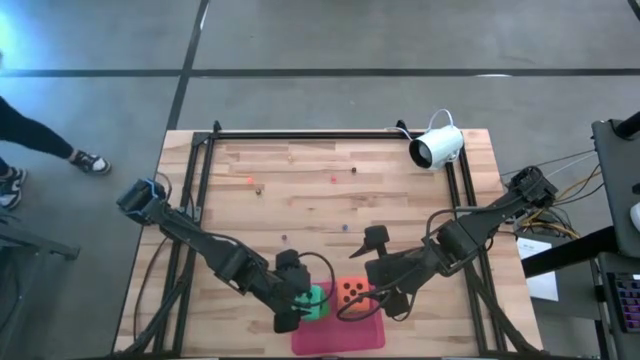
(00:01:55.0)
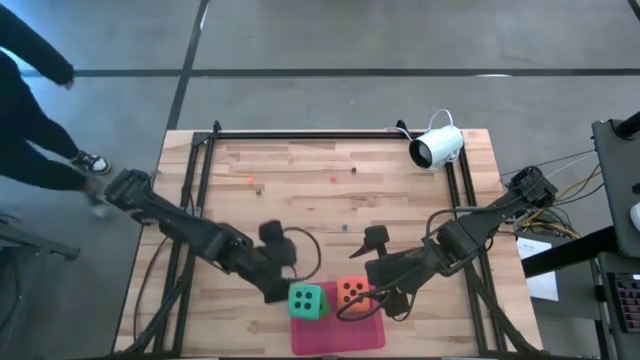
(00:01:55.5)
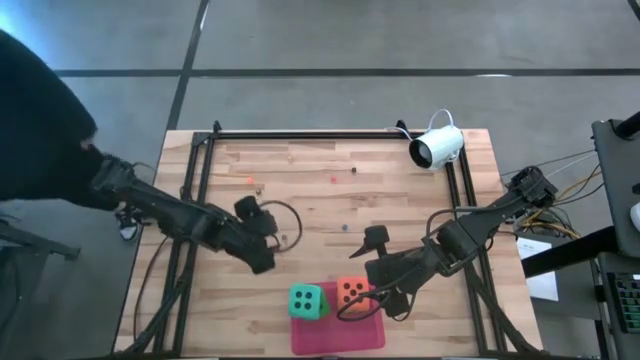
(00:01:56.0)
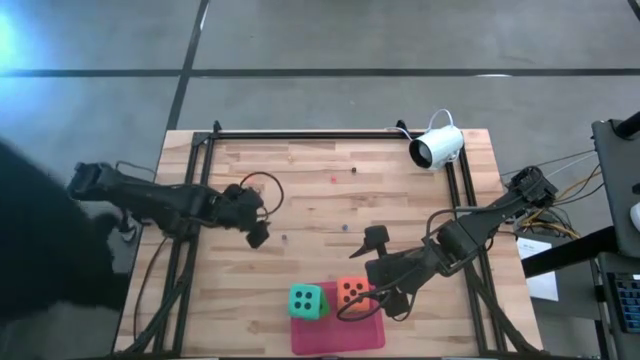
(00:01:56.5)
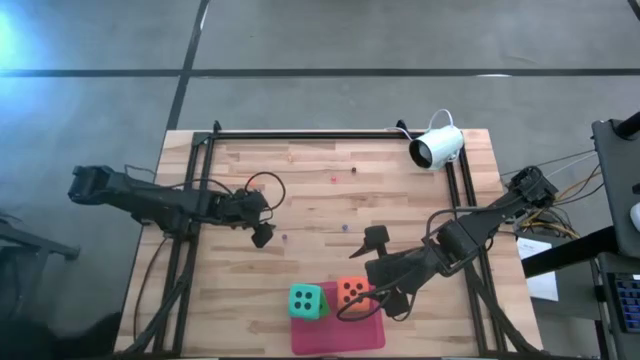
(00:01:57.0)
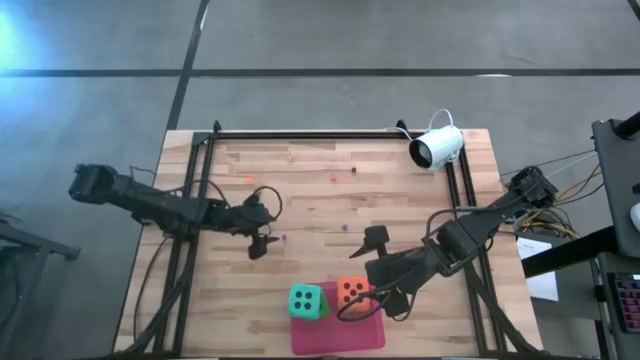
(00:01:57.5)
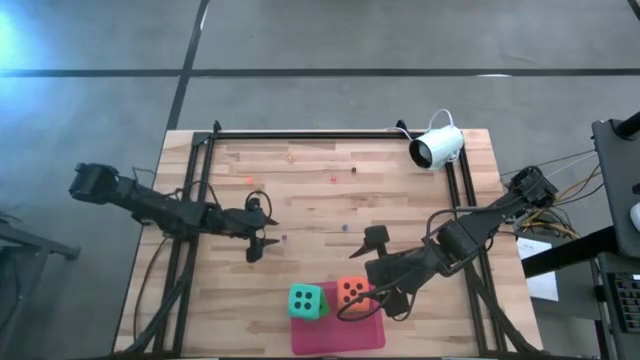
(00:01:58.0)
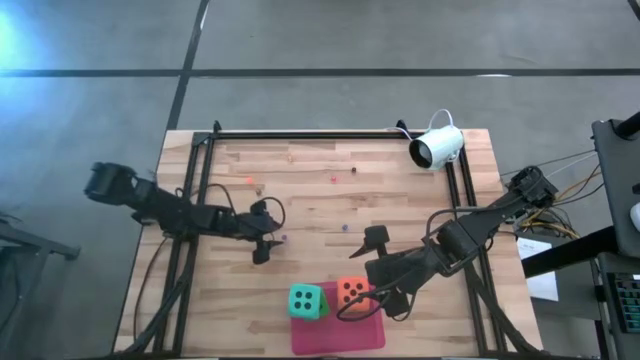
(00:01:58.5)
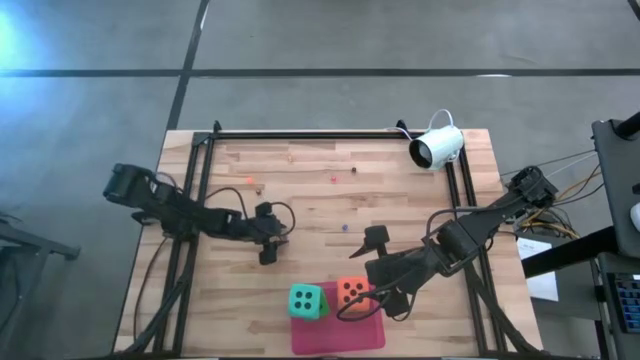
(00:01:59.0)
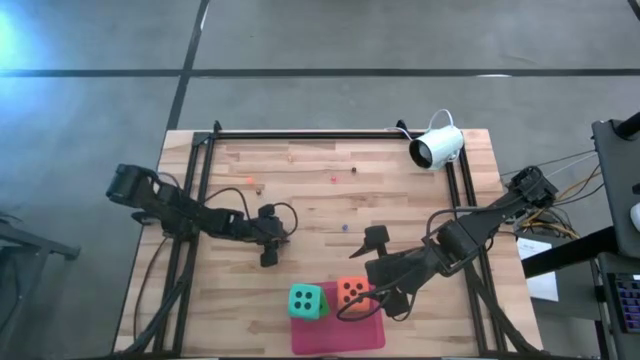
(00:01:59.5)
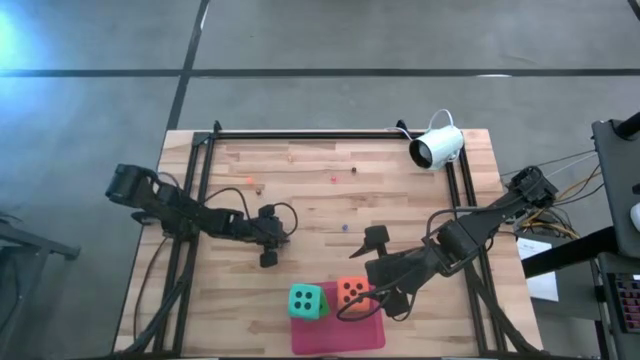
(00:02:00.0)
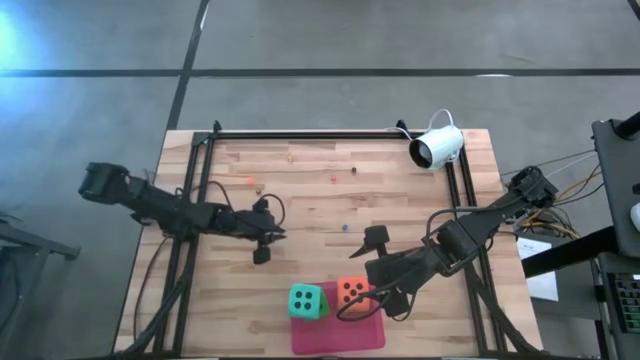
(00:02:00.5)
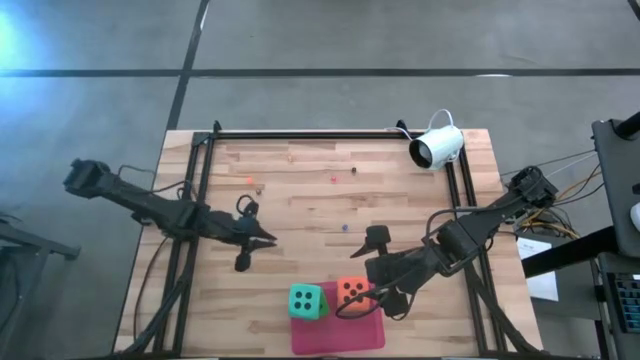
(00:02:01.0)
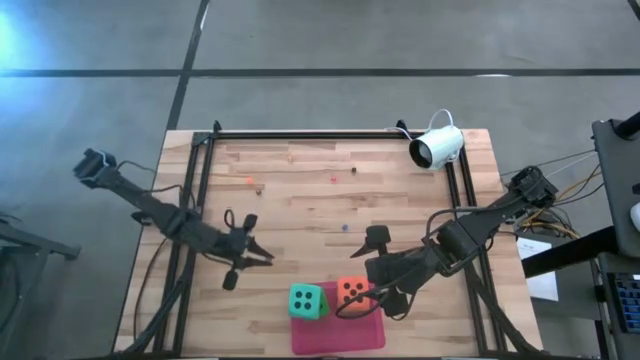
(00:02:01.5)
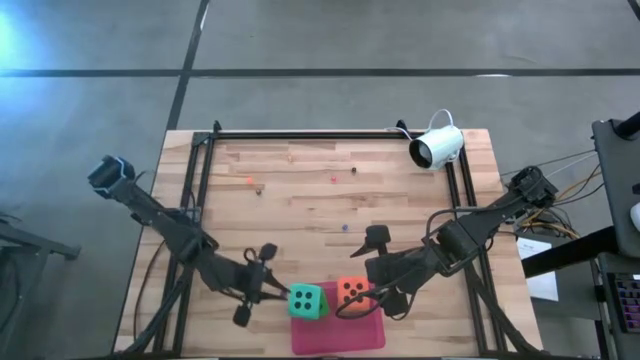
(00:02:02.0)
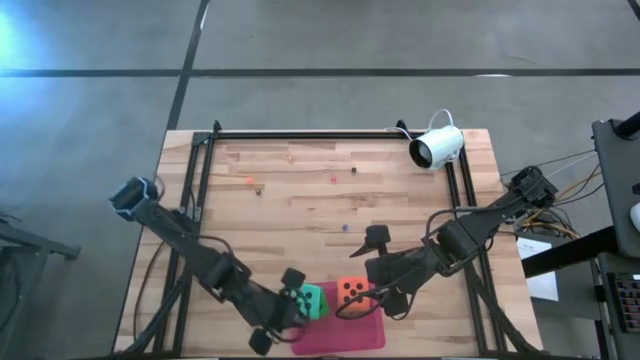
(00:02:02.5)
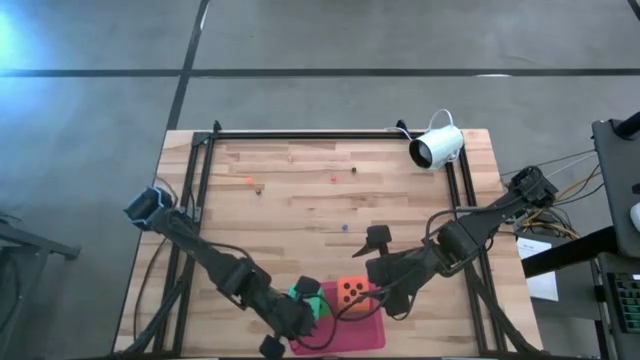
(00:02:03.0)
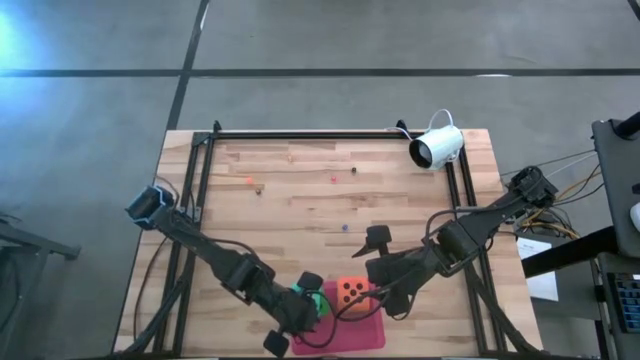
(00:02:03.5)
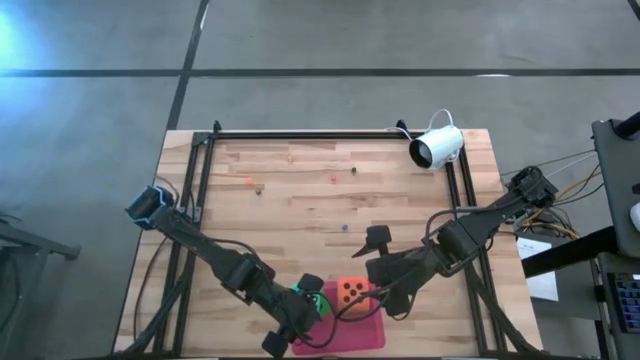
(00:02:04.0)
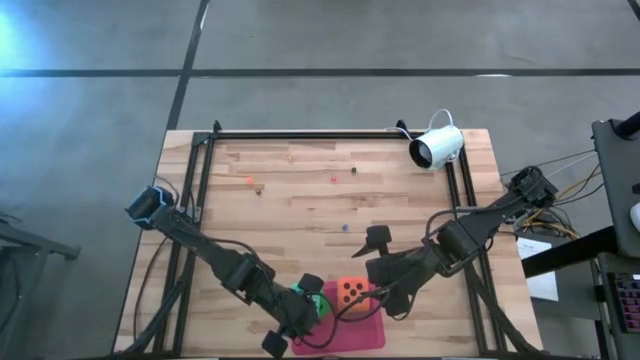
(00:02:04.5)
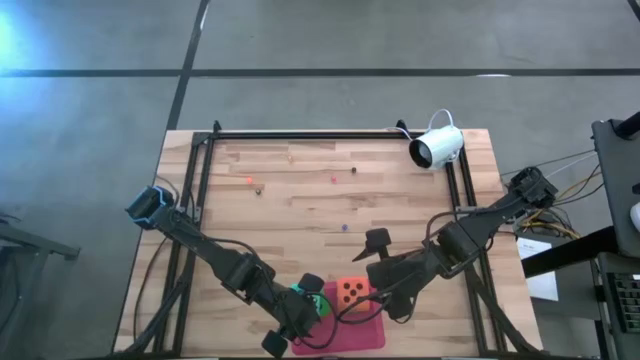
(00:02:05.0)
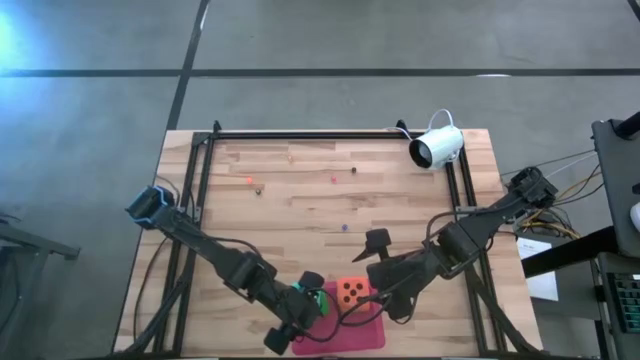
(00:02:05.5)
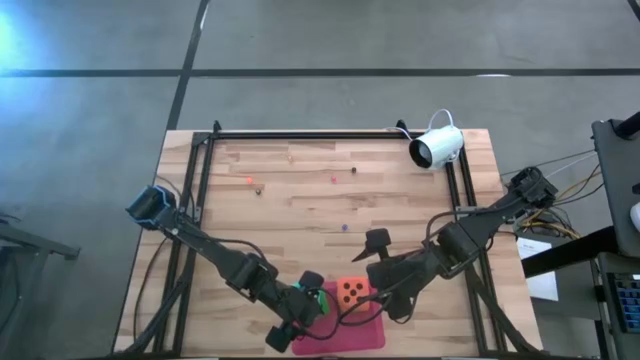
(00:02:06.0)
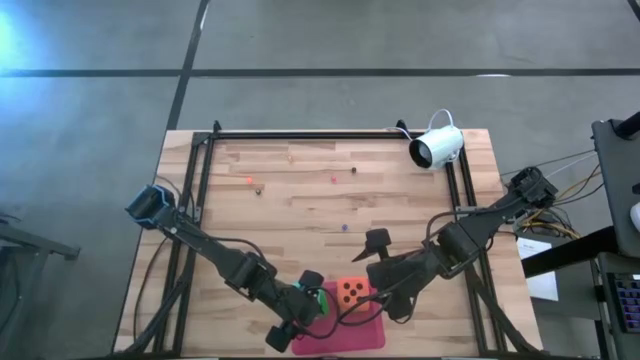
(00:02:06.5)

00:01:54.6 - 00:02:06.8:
Task: Pick & Place Dice
Put the purple dice into the pink bin

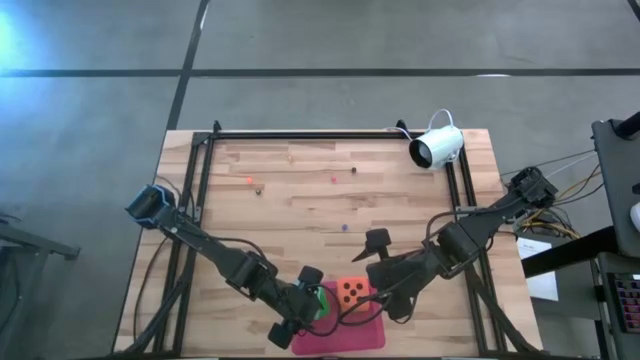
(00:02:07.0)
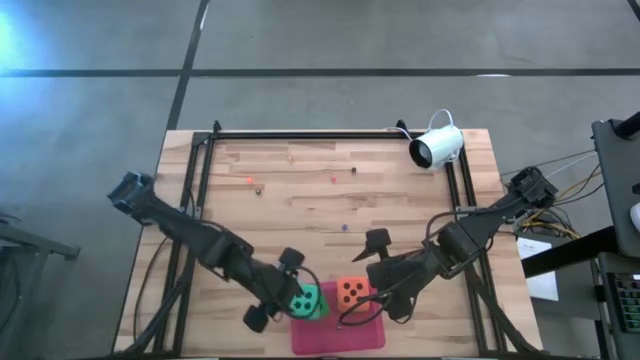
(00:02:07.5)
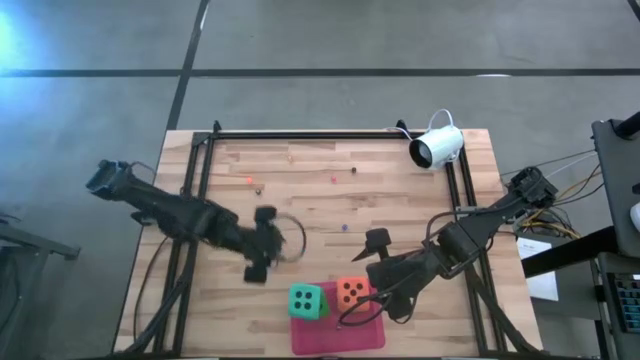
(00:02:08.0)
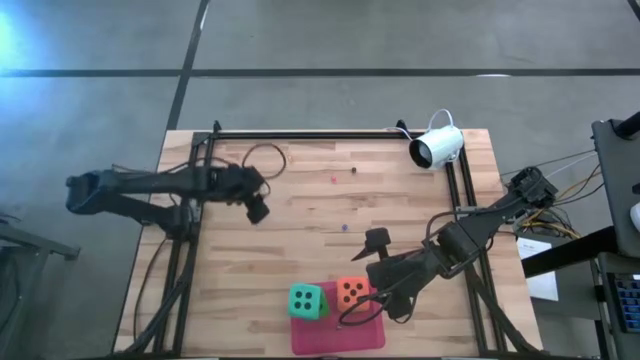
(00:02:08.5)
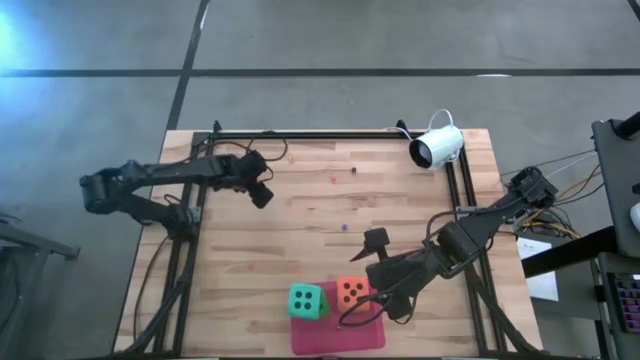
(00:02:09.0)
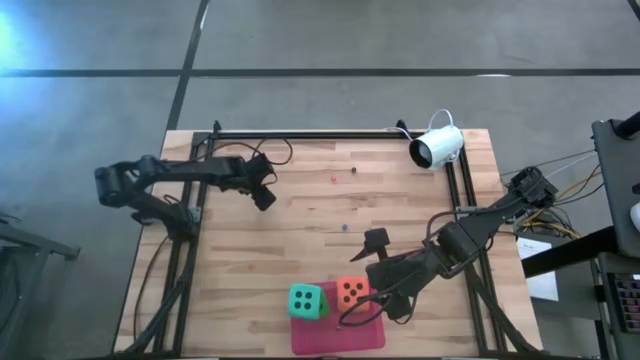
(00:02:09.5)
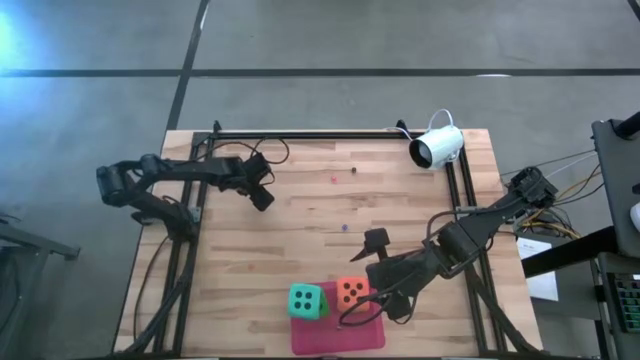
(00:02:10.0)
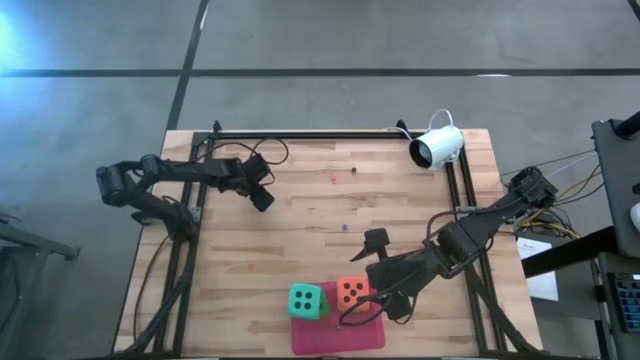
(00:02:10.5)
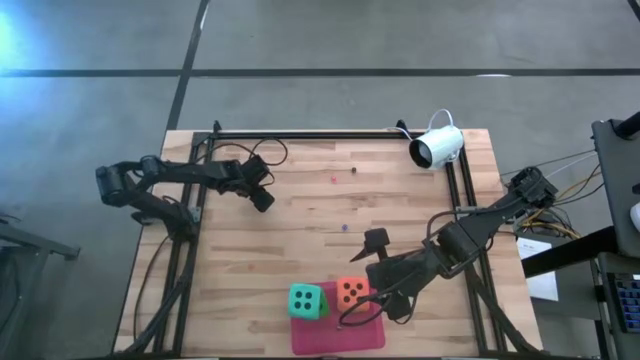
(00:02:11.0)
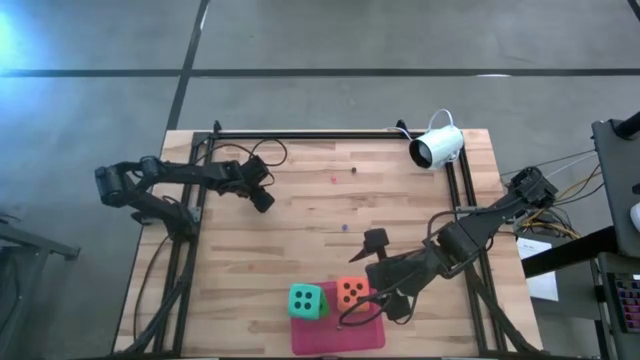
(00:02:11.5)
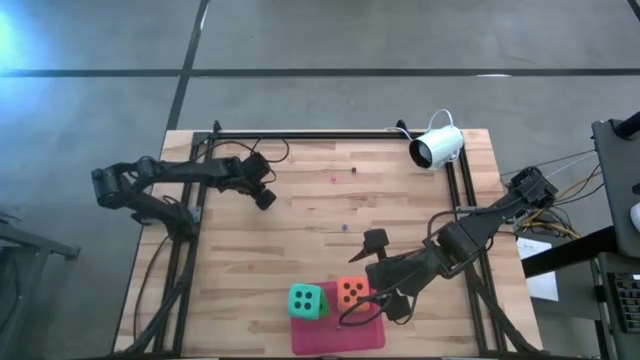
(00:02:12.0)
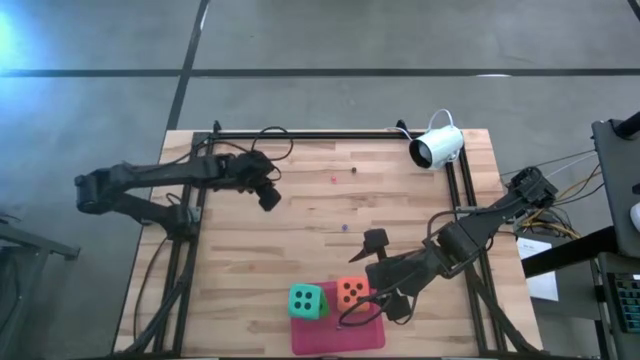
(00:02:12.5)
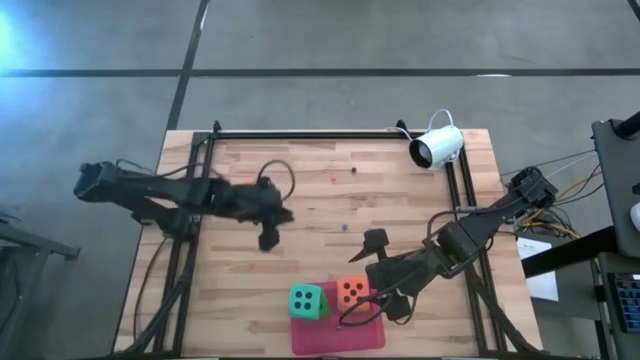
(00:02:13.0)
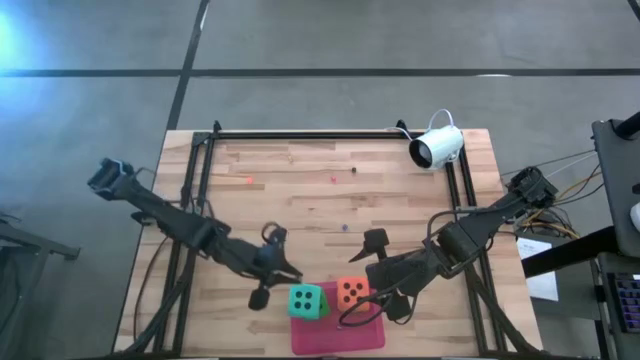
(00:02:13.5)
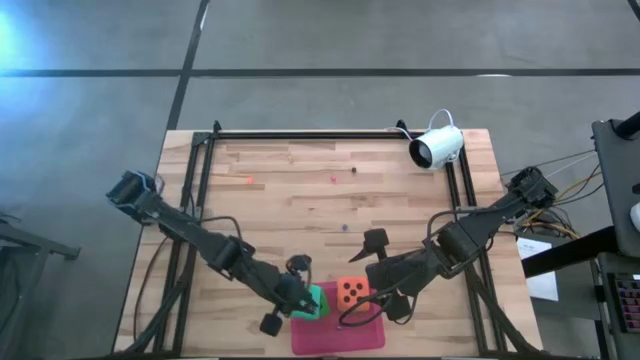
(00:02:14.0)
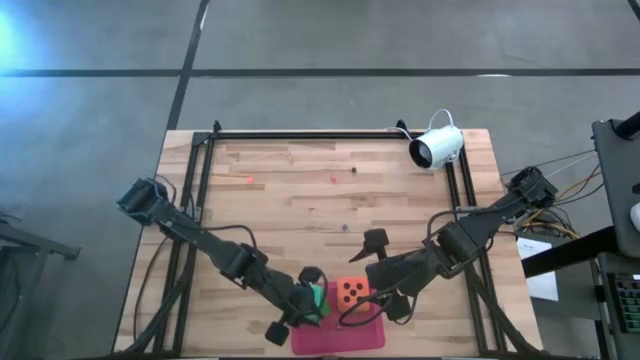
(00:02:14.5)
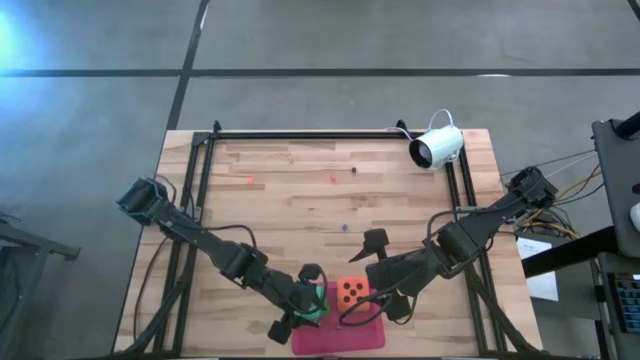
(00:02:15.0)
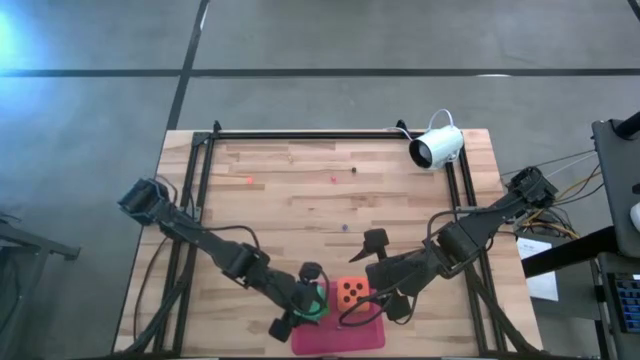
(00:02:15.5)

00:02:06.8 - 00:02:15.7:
Put the left black dice into the pink bin
